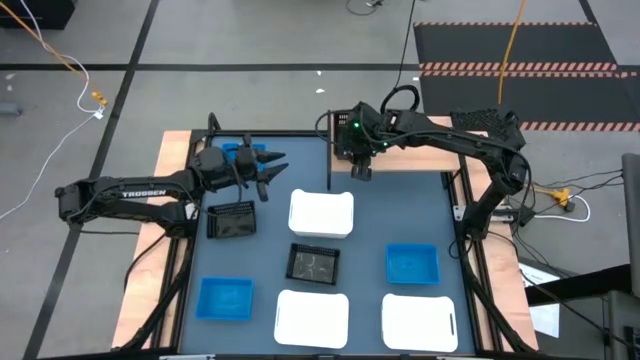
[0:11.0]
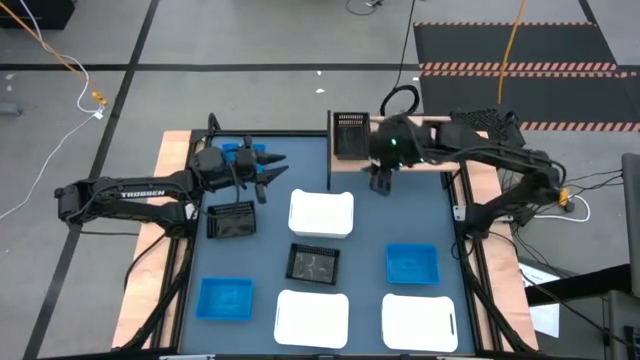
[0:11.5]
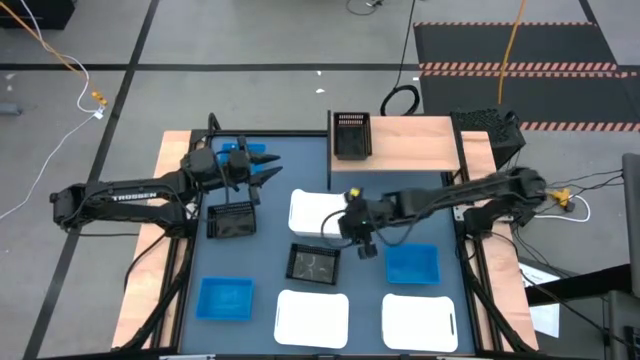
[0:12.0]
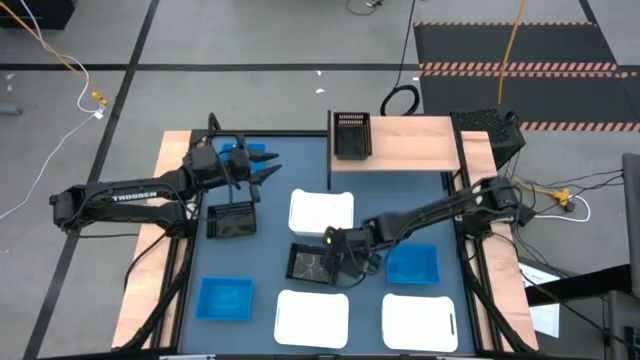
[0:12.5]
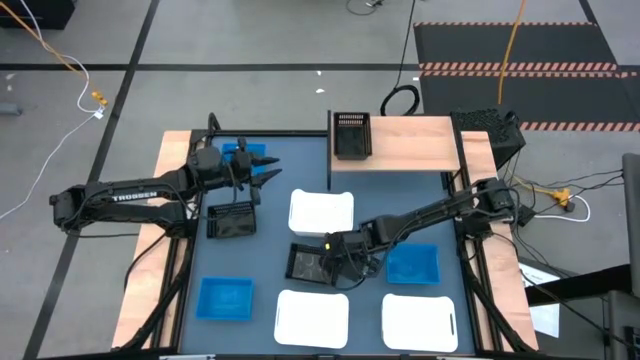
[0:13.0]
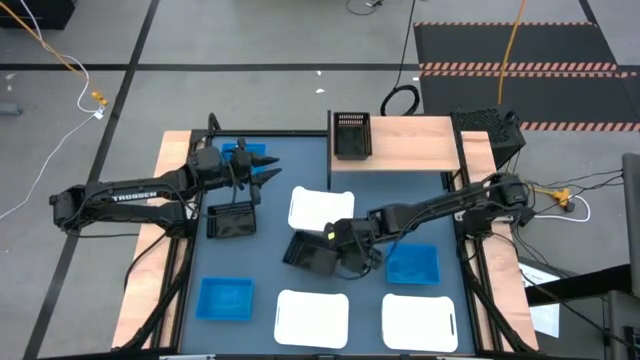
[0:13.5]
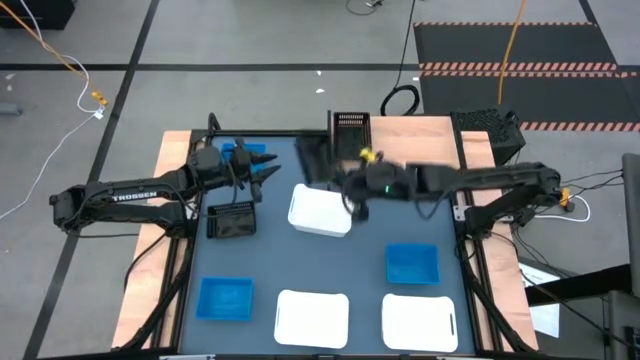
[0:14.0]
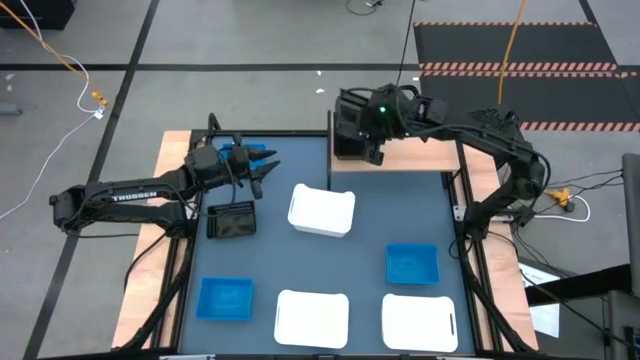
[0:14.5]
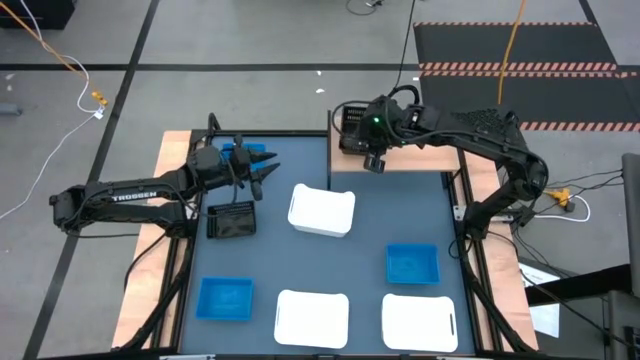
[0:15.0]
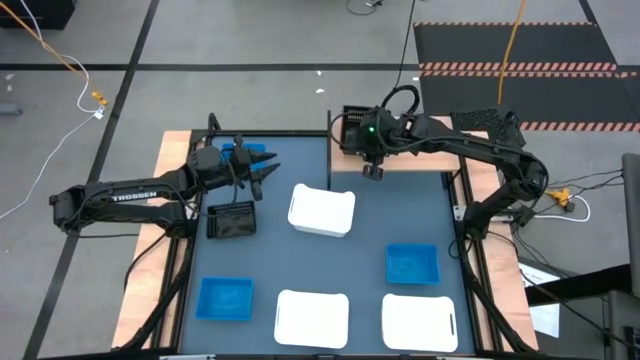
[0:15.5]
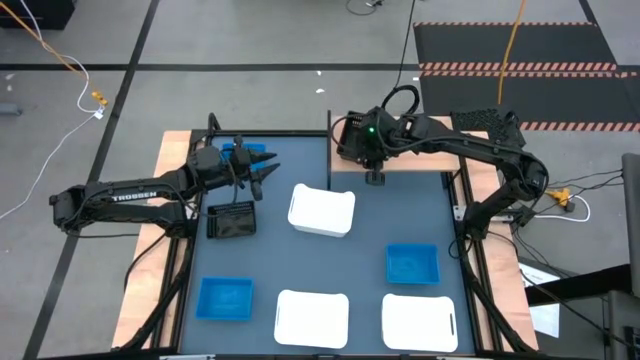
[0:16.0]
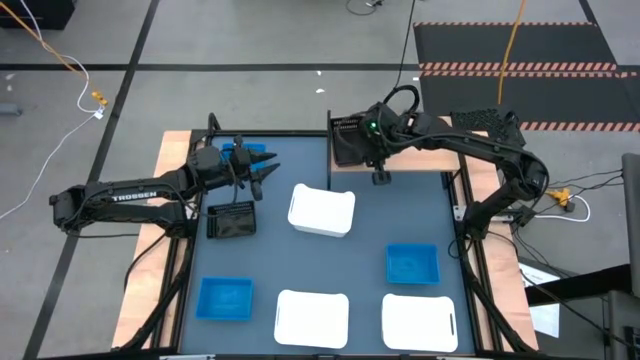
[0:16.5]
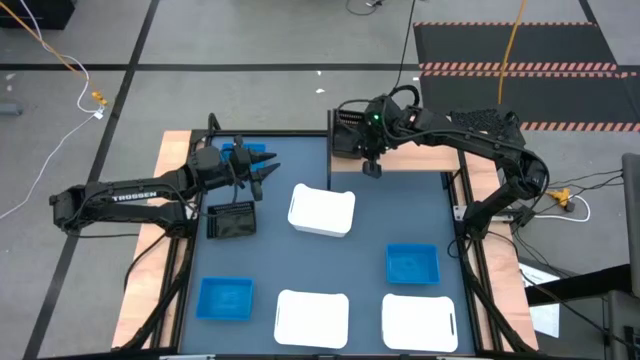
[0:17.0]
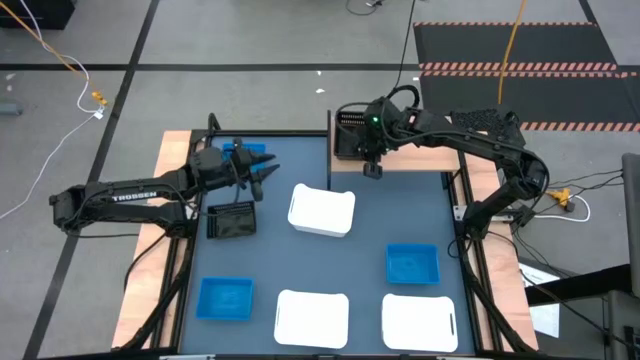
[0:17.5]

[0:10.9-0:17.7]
Task: Stack baskets on shelf by color
Stack the right black bin on top of the black bin into the shelf

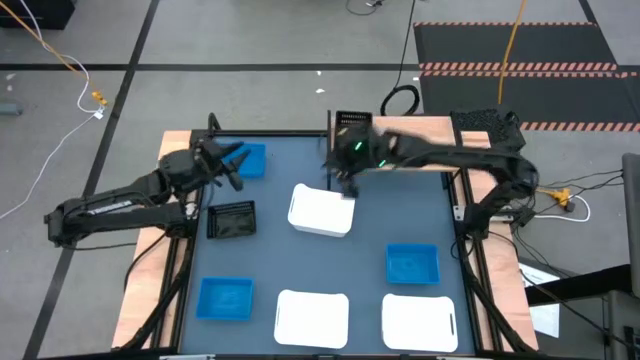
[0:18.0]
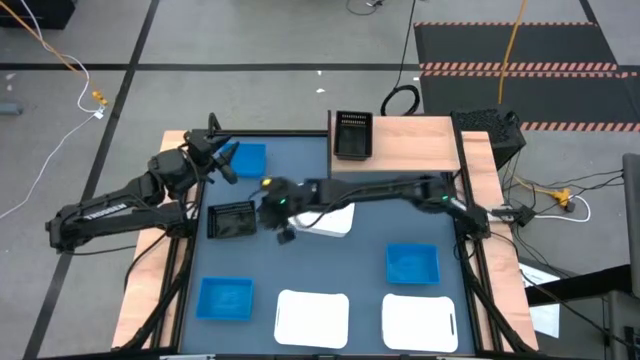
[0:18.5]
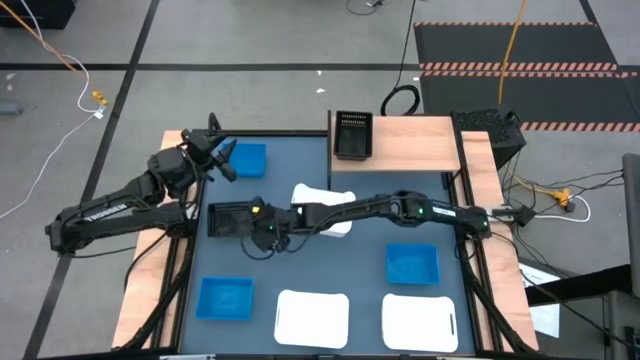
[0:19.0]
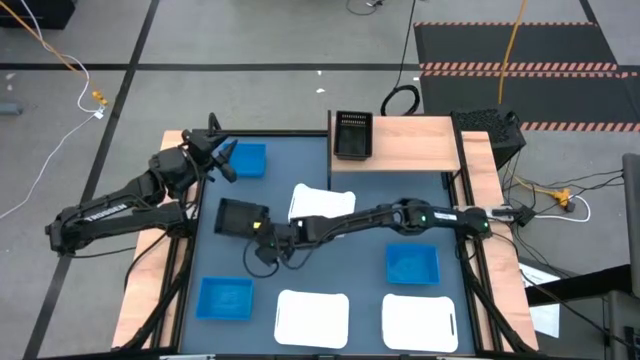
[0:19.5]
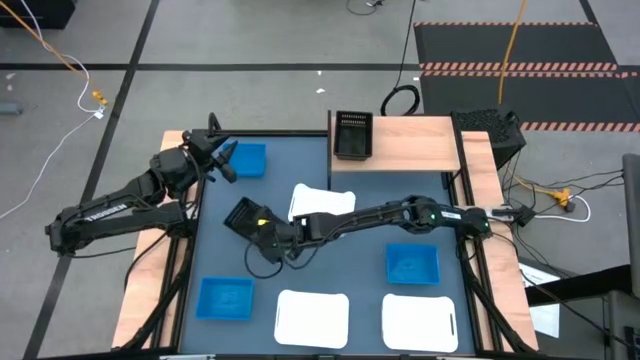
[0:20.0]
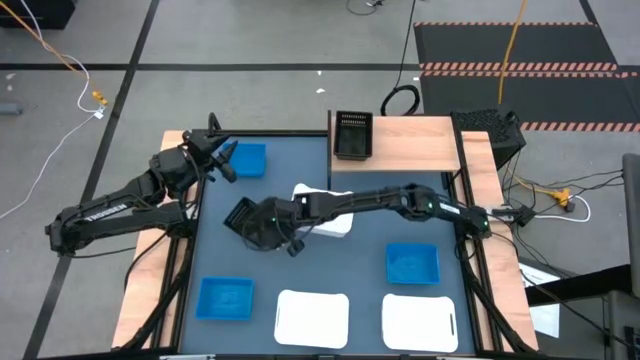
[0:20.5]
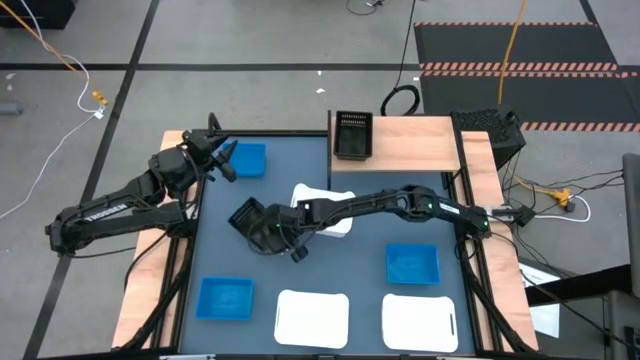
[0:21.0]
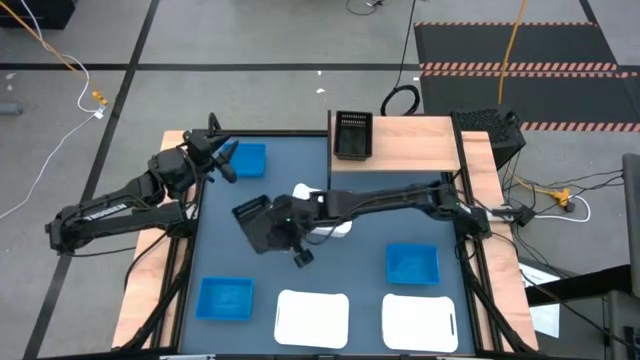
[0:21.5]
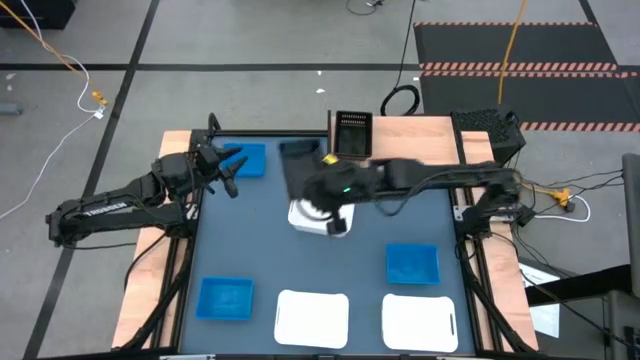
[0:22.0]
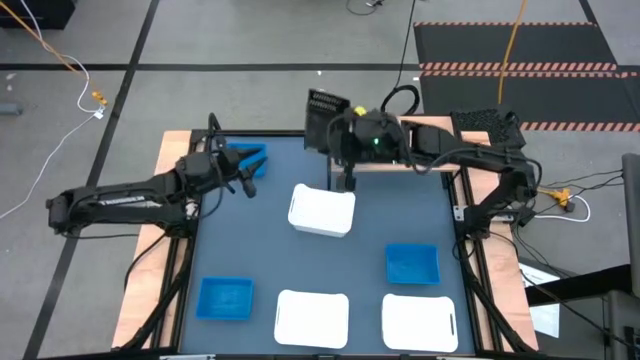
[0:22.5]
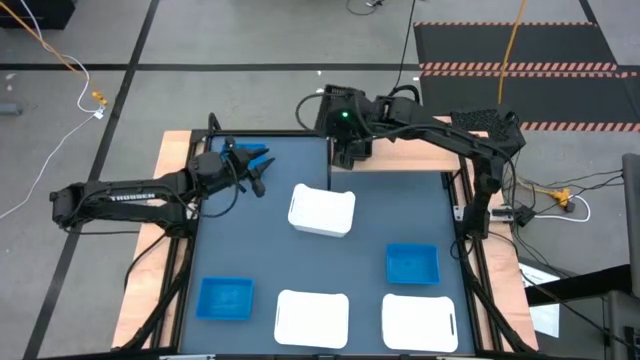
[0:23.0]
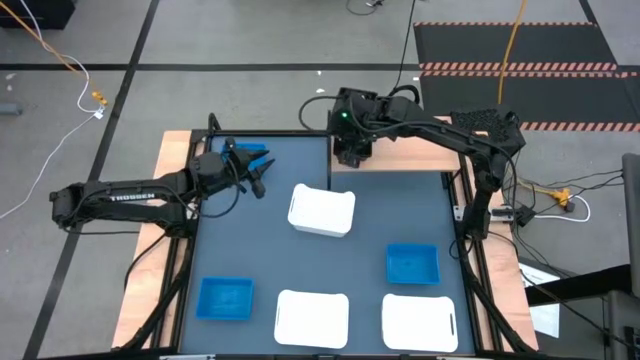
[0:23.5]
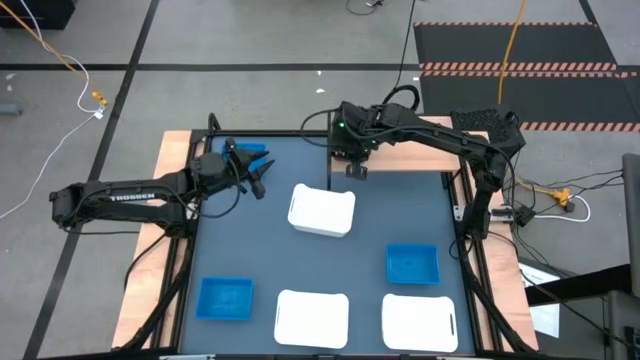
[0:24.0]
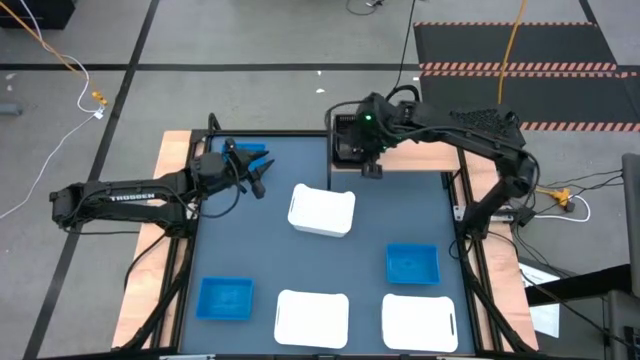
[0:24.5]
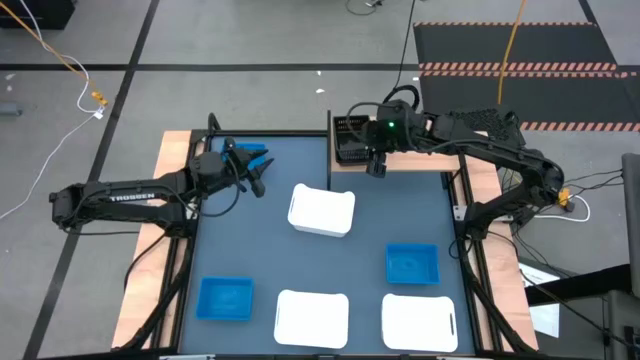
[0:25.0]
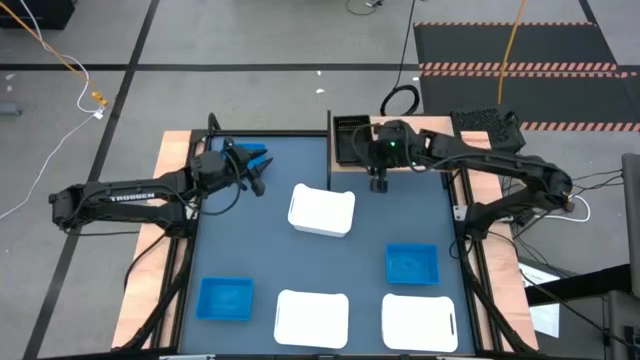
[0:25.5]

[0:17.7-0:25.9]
Stack the black bin on top of the stacked black bin into the shelf

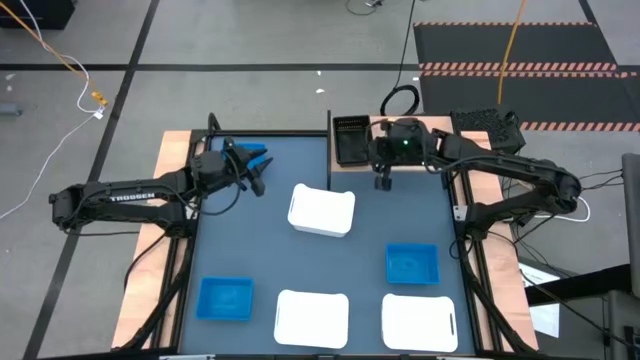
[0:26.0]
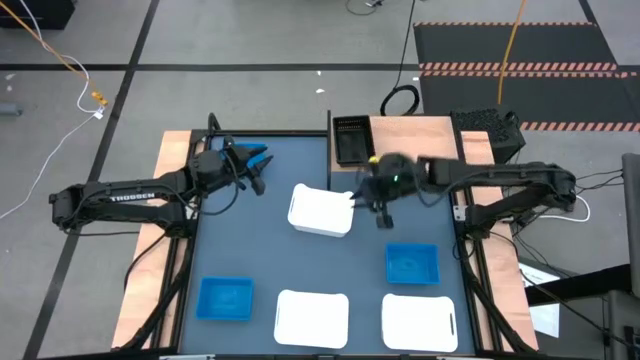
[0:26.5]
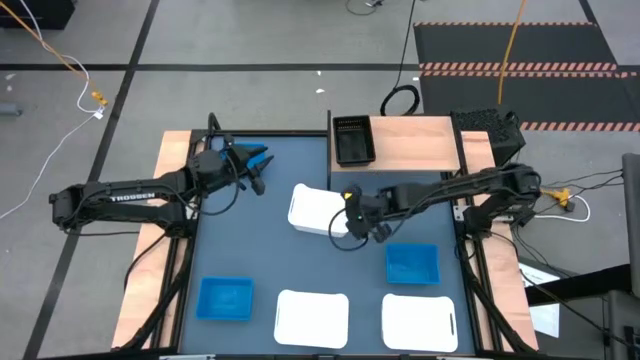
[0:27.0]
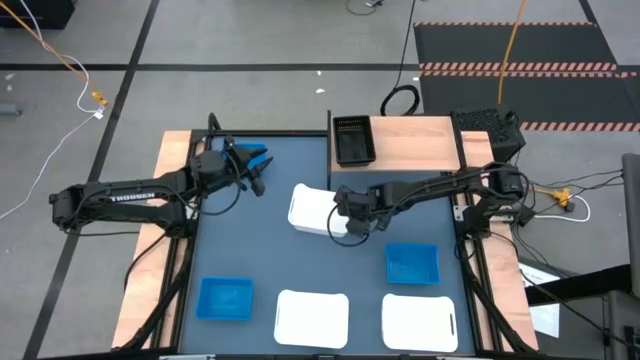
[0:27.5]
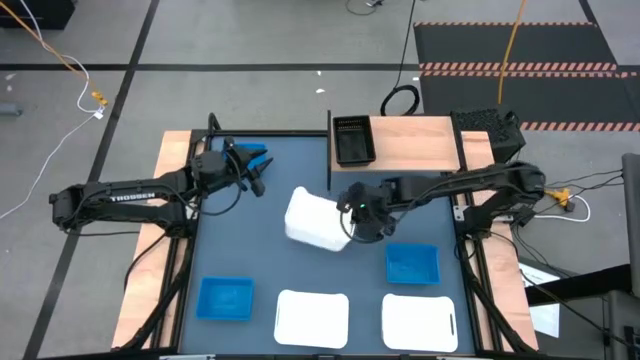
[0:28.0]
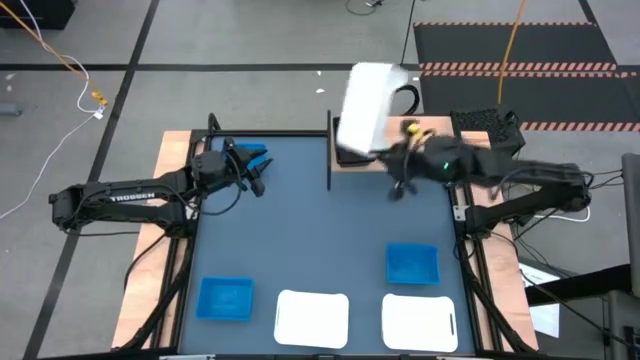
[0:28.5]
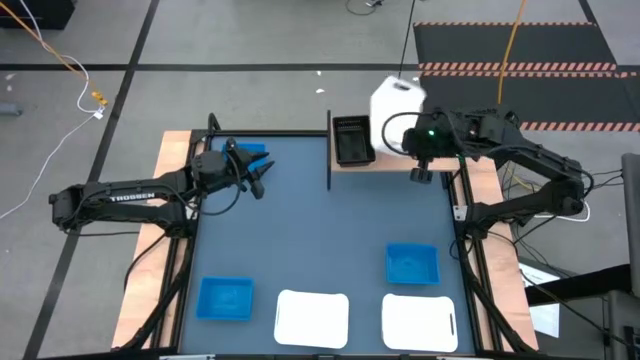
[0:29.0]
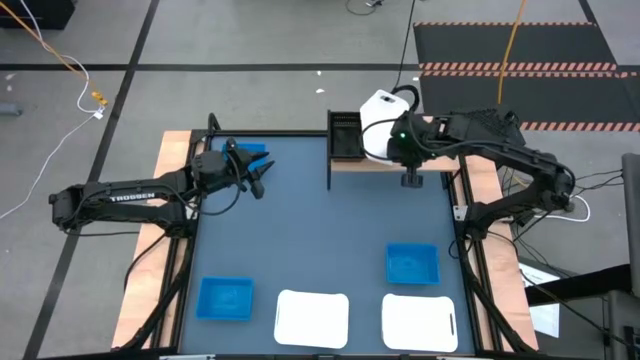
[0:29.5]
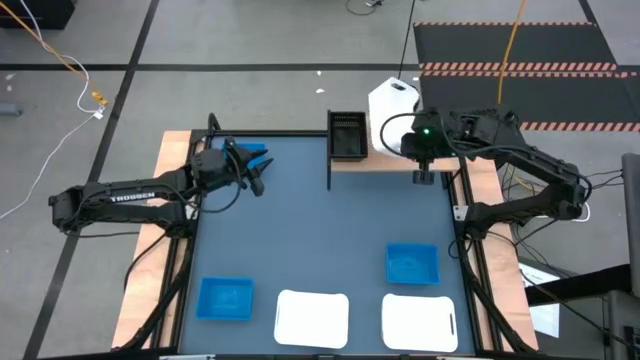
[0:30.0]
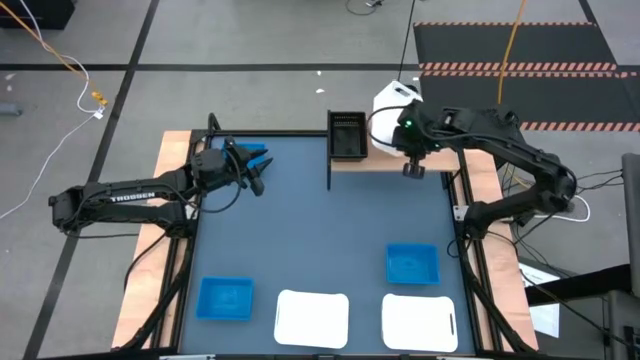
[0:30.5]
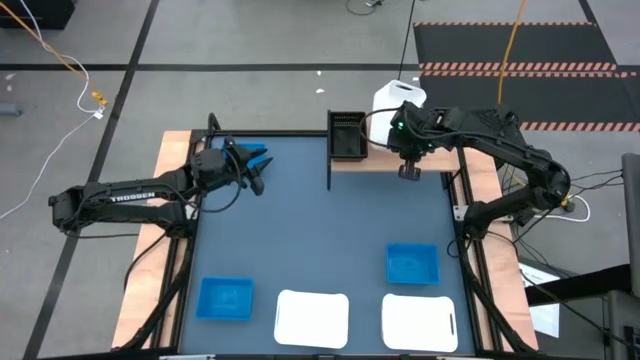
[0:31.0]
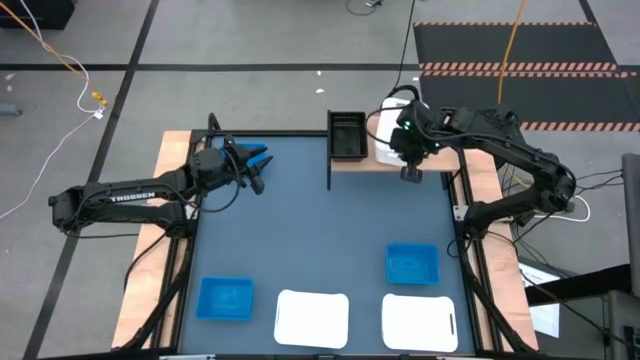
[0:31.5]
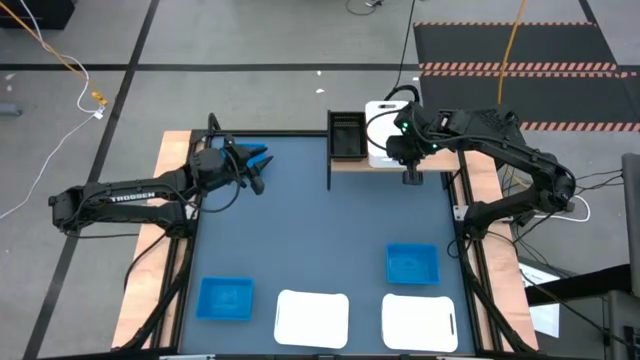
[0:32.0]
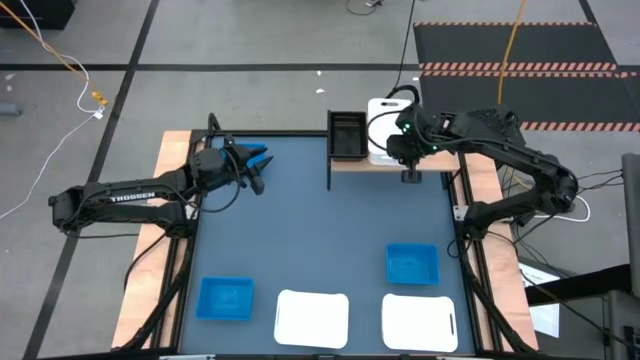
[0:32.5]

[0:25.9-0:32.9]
Put the top white bin into the shelf
